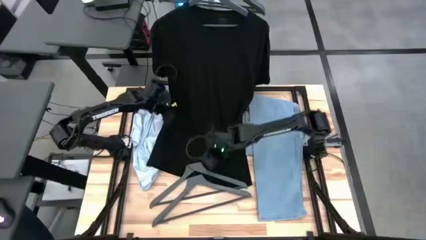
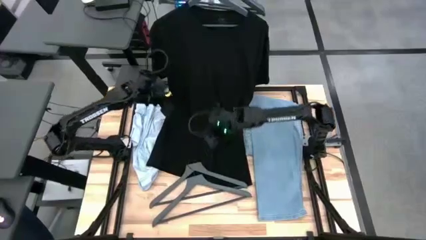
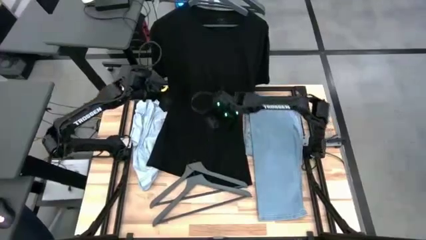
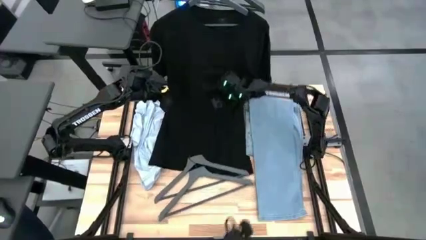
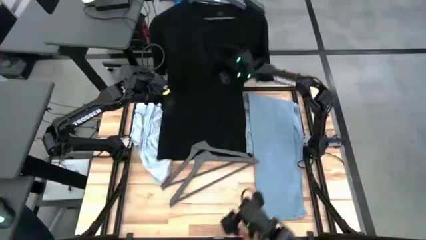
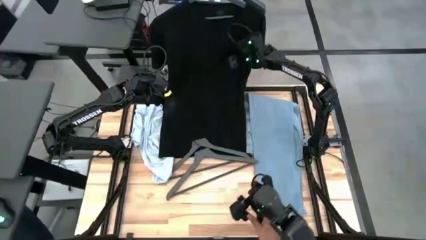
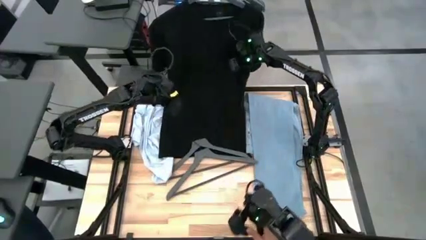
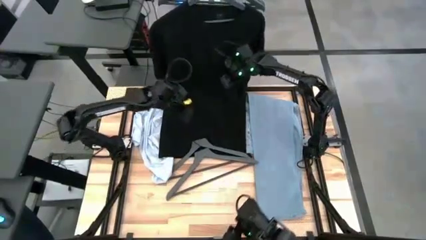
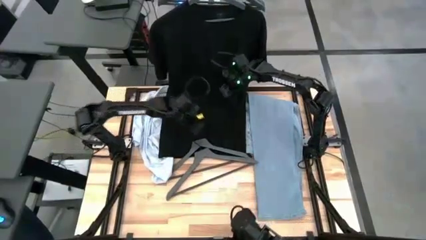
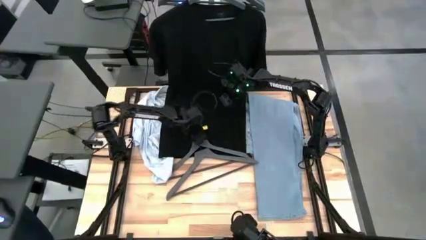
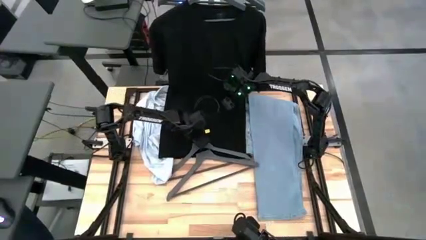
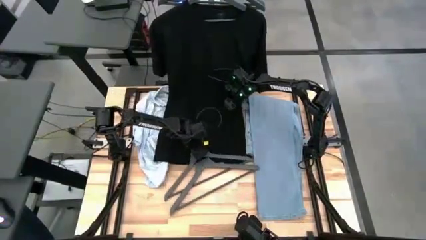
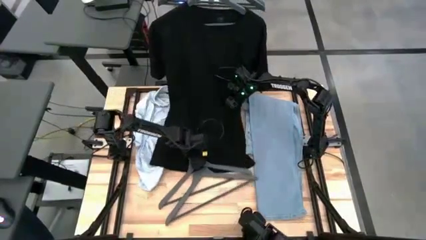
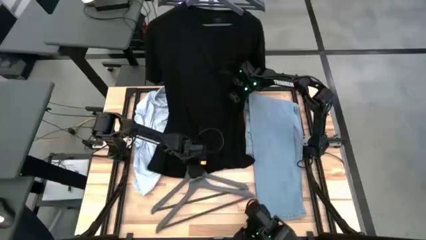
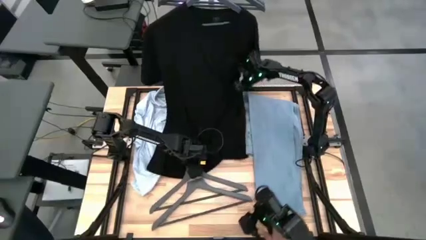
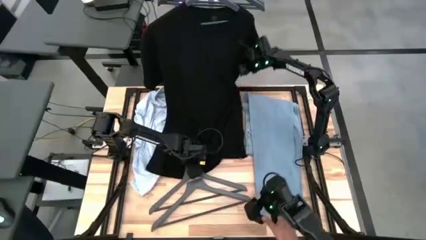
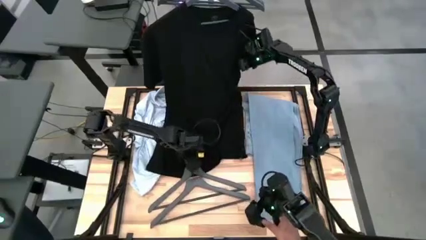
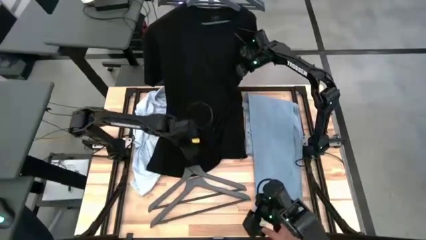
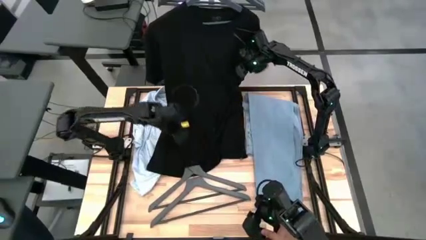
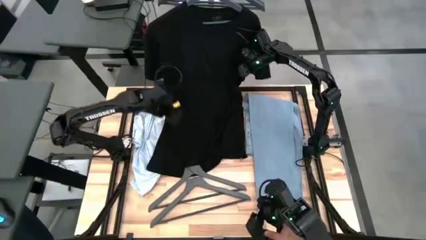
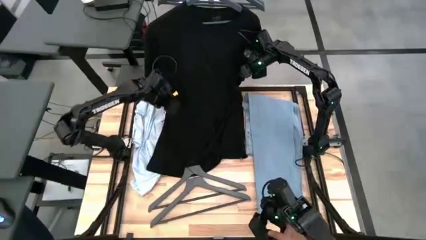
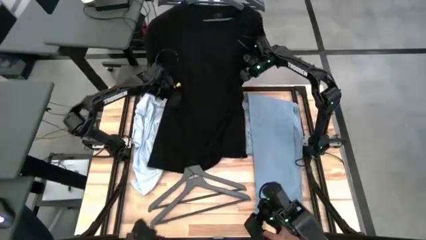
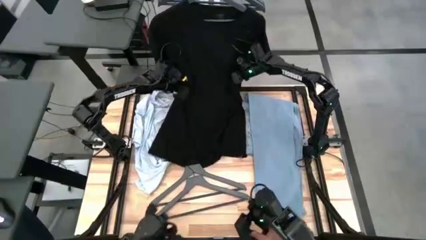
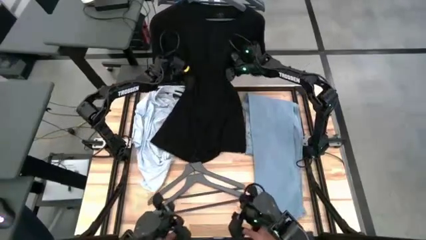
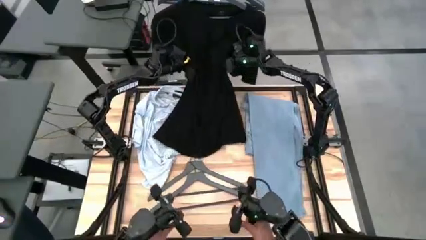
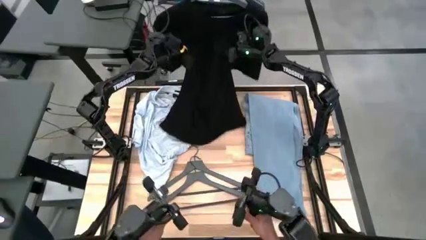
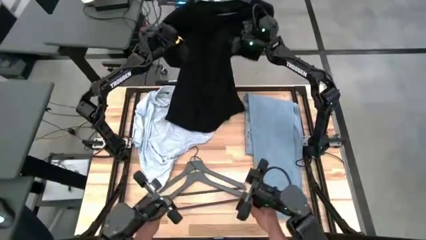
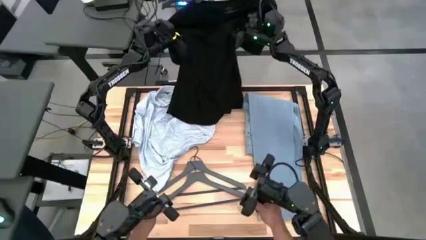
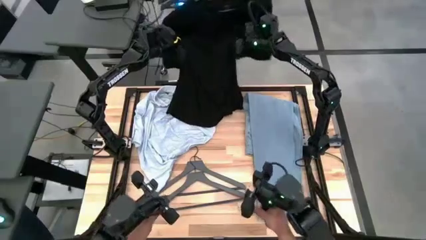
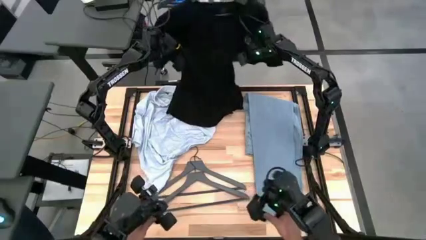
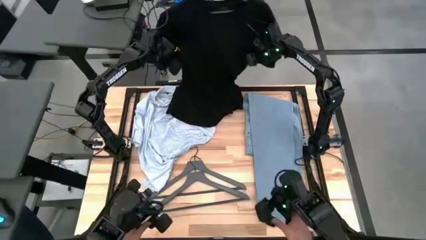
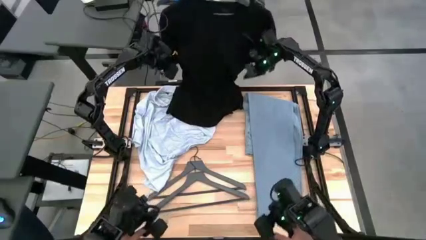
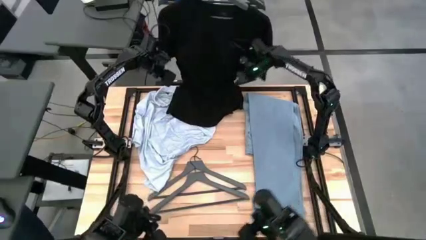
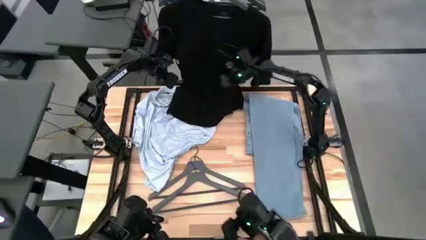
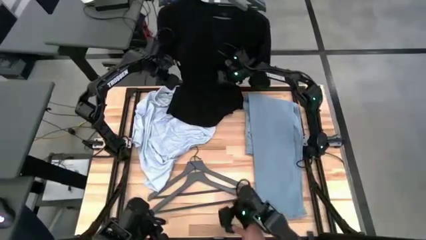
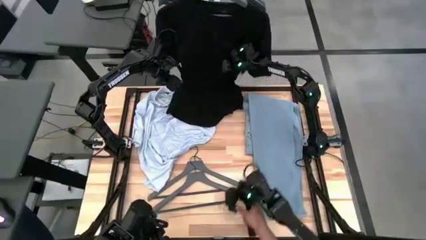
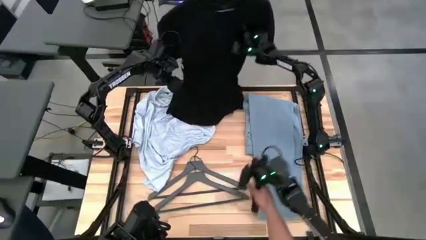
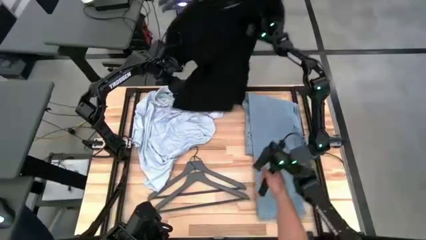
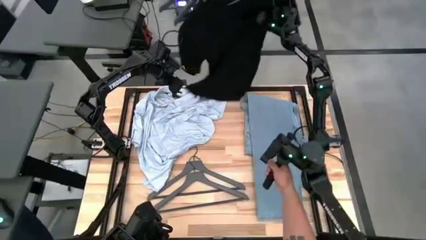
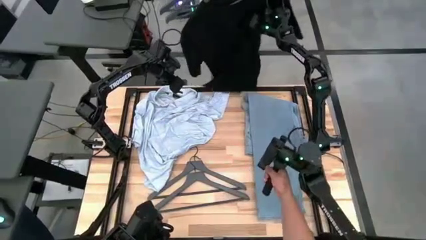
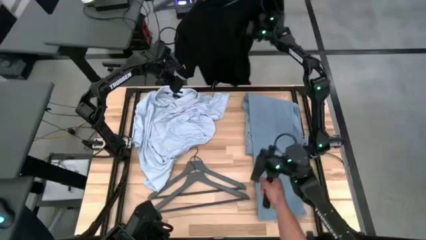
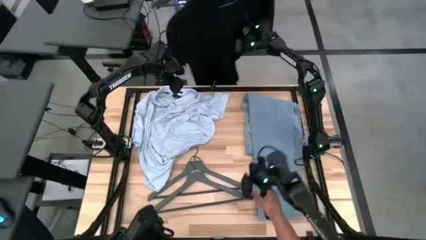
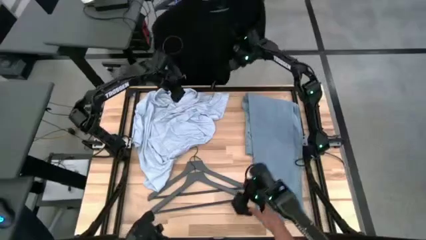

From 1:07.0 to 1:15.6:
Task: Hang clothes
Adjust black shirt on the rack

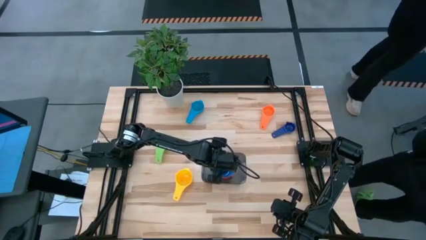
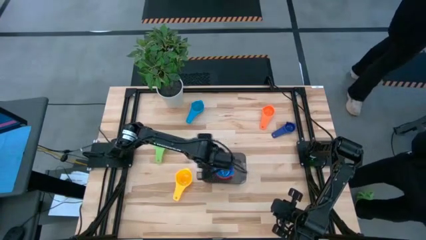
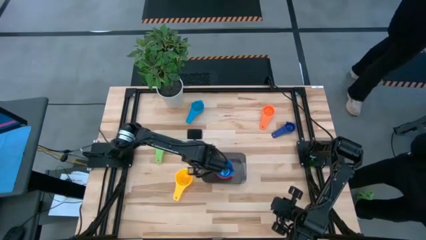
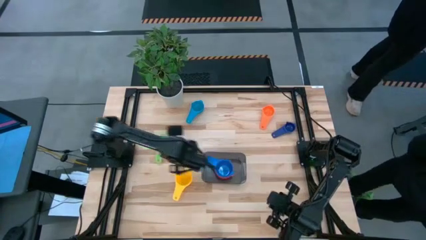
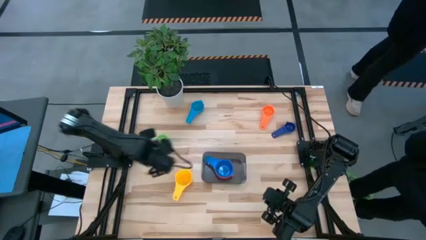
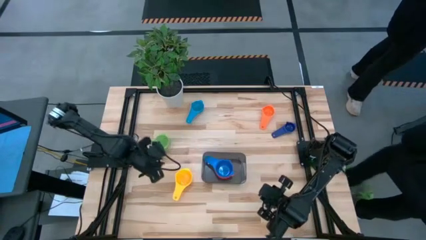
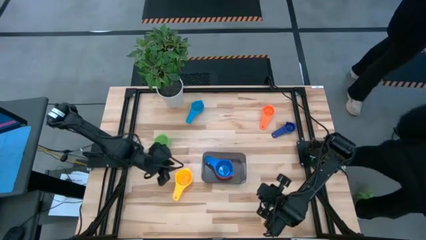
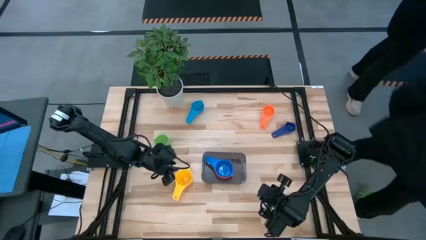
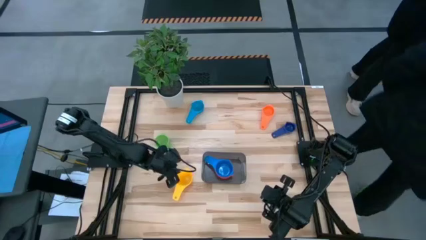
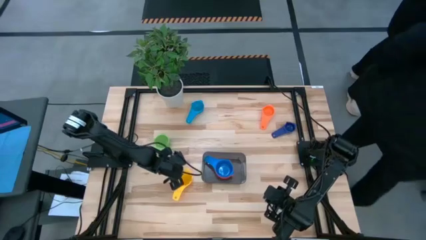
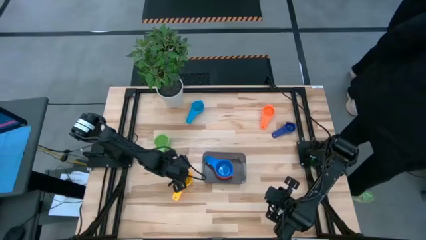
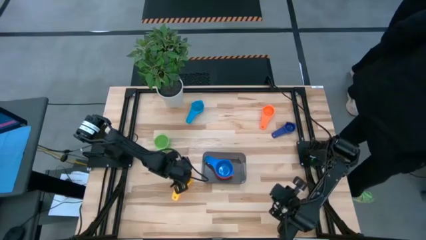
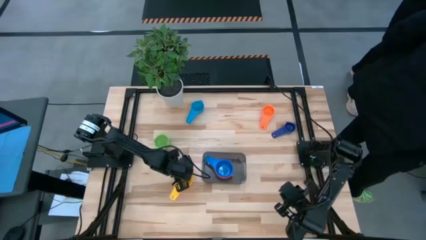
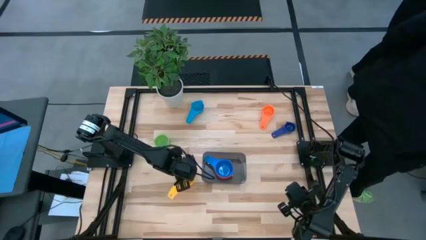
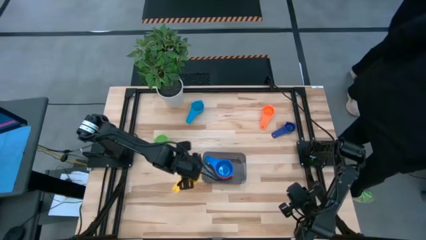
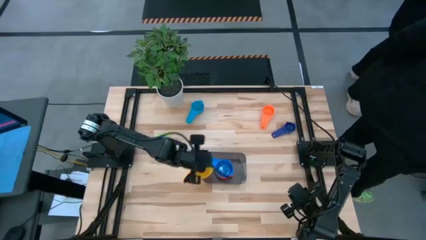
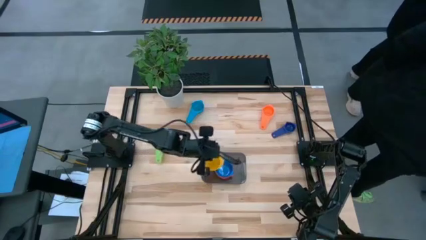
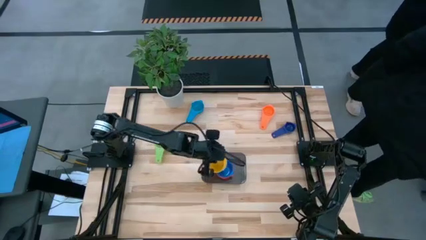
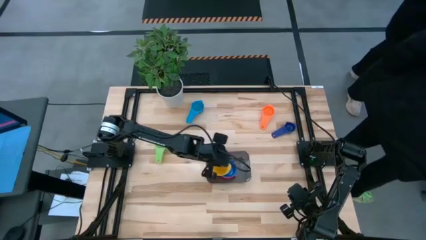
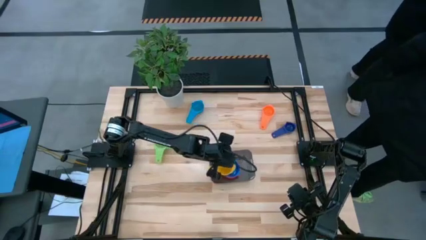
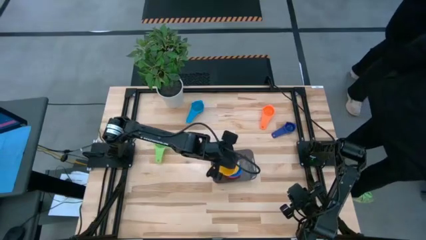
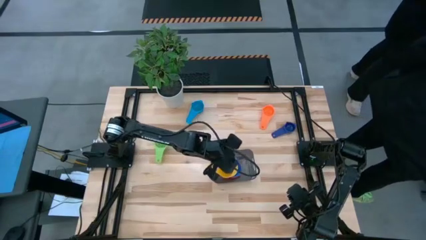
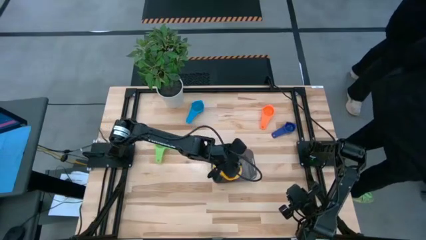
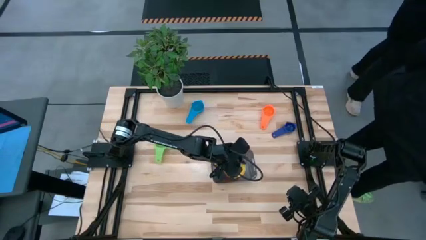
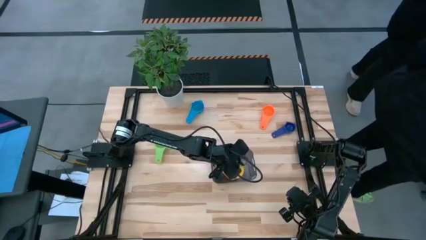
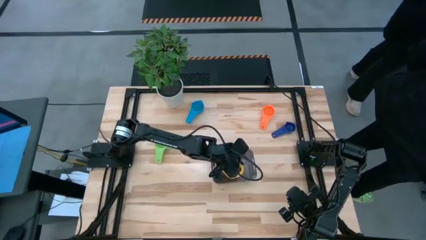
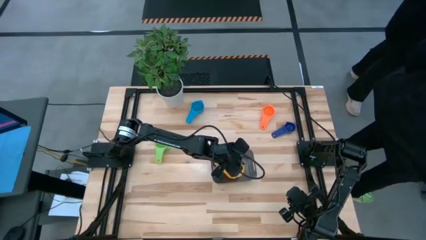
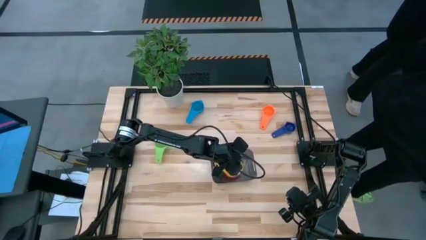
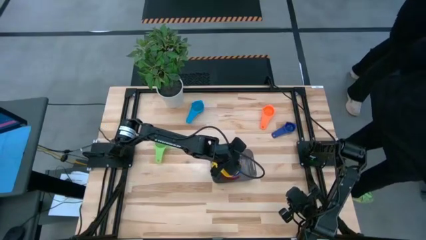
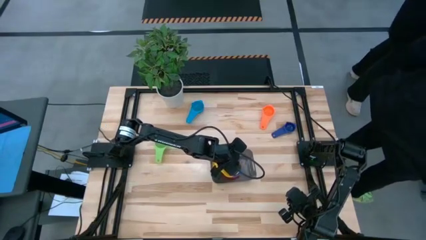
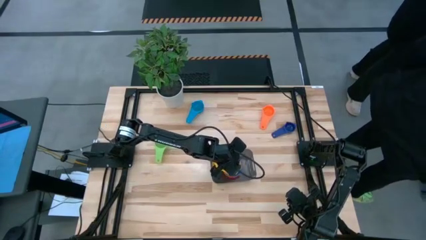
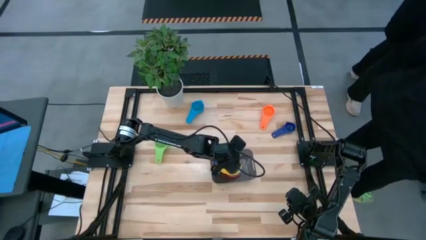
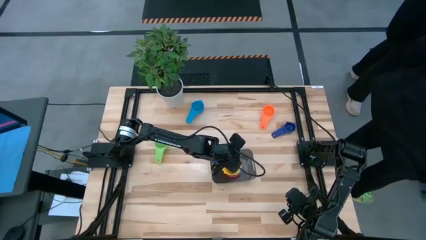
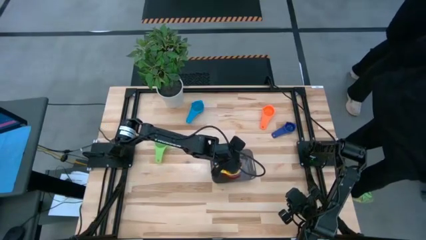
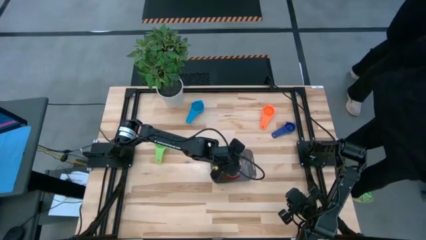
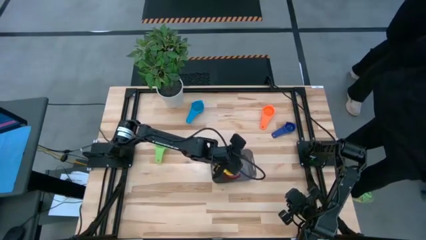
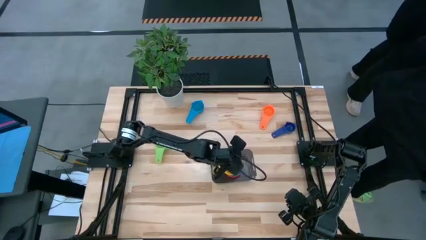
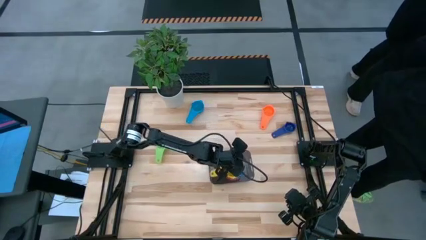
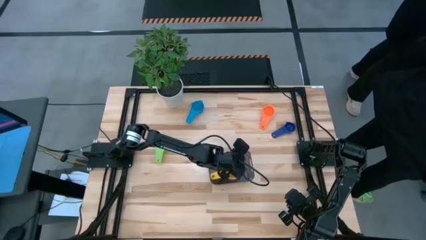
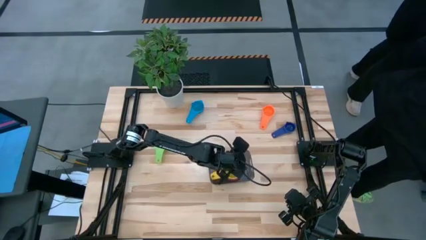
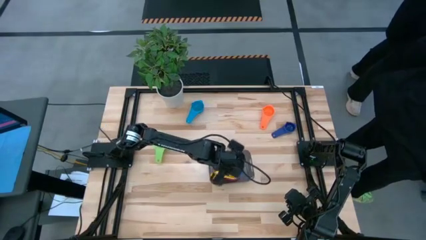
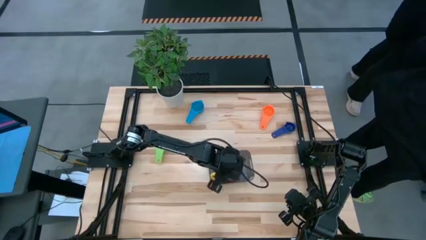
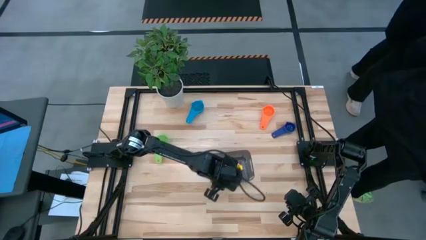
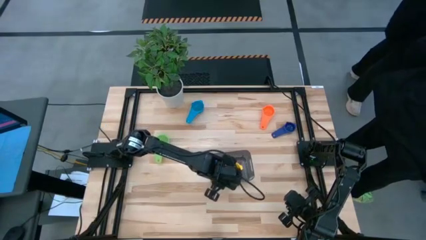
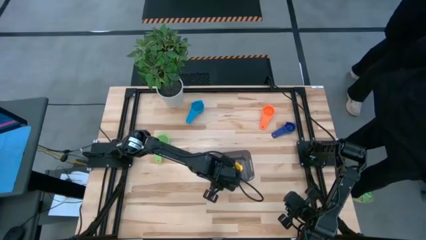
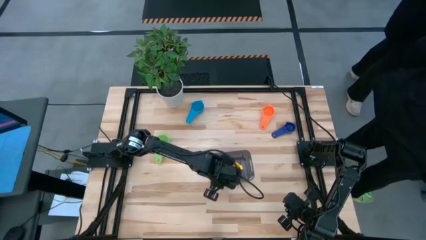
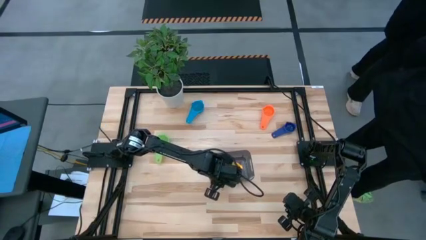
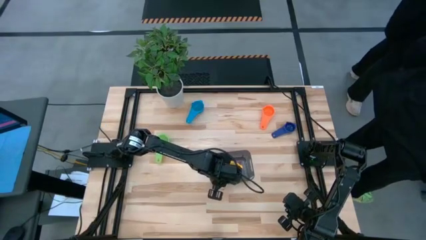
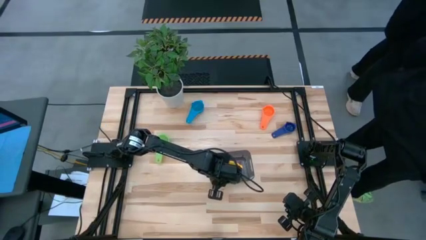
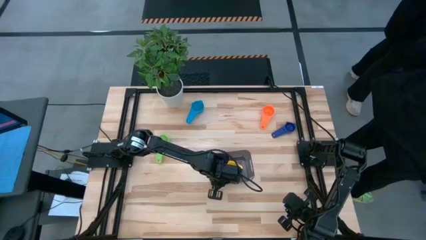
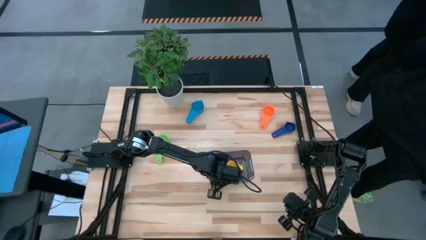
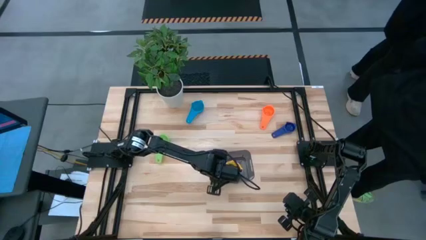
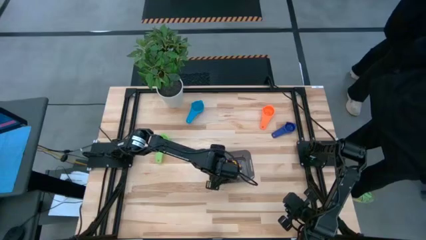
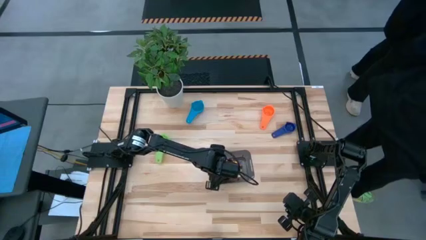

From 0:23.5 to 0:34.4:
Task: Nest measuring cups in basket
Stack the yellow measuring cup on top of the blue measuring cup into the black bin
